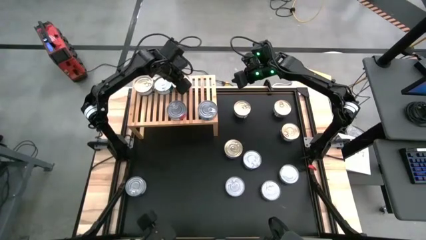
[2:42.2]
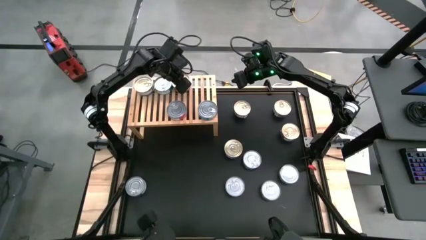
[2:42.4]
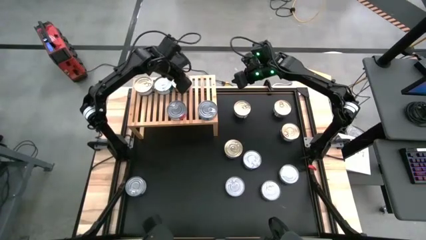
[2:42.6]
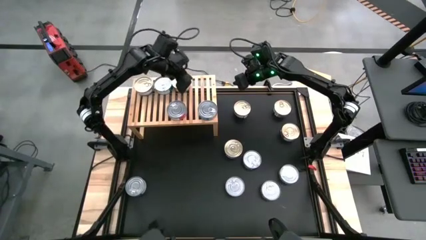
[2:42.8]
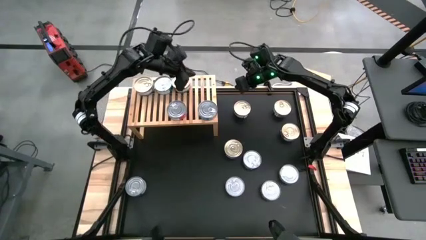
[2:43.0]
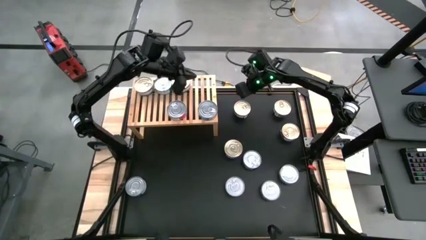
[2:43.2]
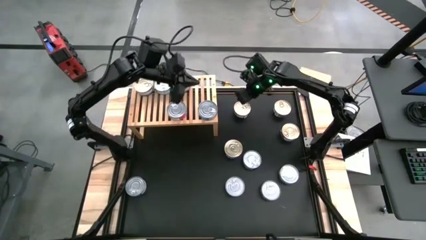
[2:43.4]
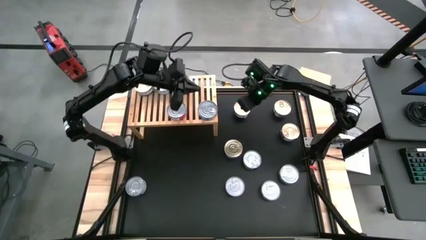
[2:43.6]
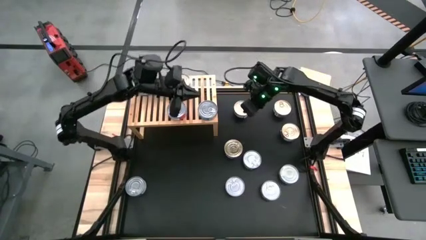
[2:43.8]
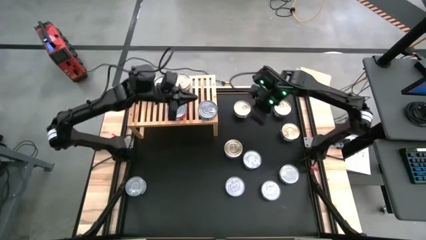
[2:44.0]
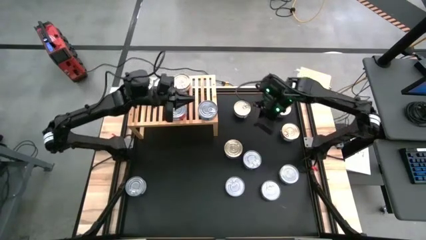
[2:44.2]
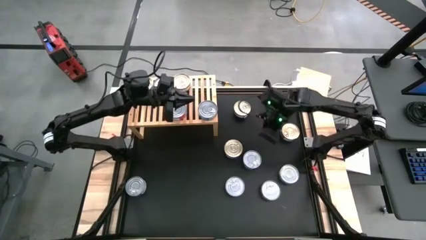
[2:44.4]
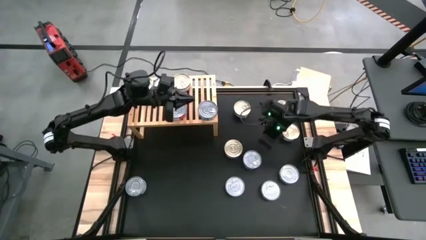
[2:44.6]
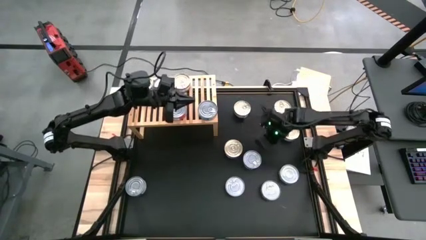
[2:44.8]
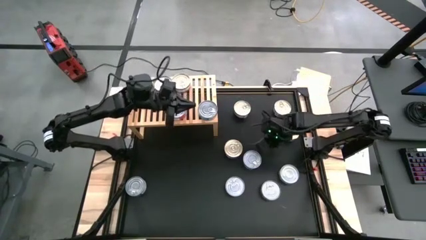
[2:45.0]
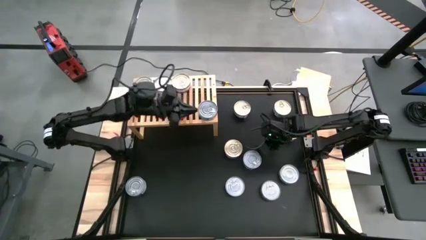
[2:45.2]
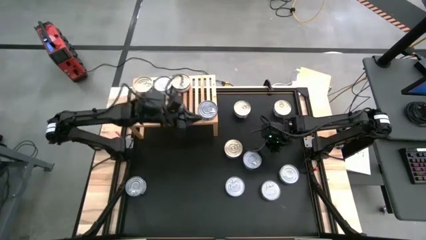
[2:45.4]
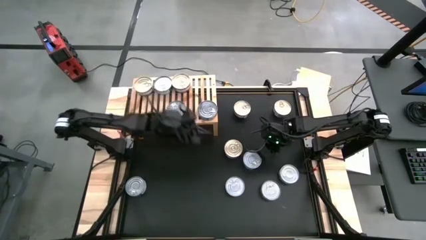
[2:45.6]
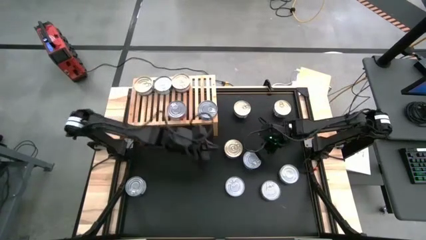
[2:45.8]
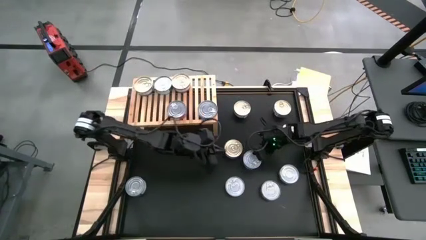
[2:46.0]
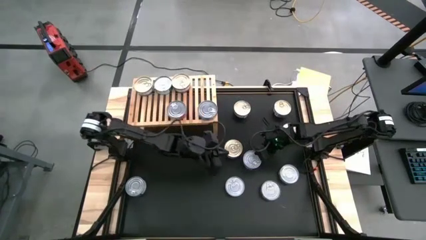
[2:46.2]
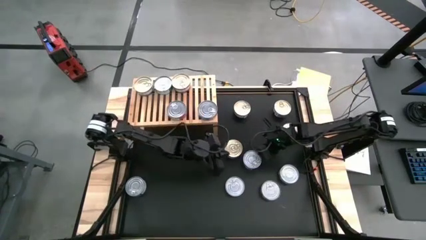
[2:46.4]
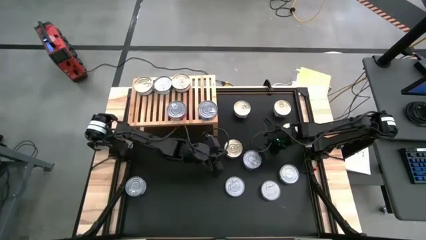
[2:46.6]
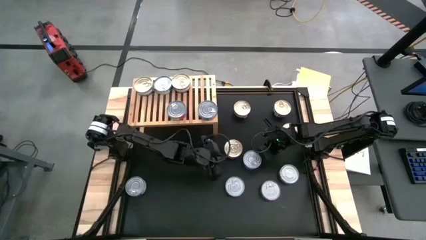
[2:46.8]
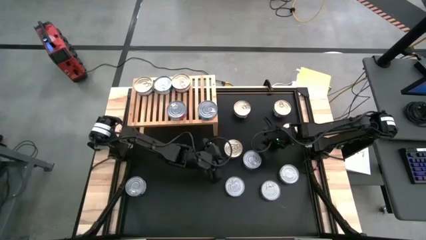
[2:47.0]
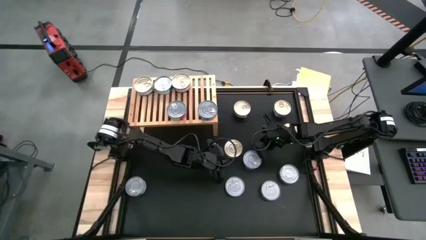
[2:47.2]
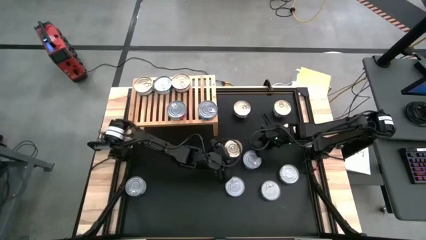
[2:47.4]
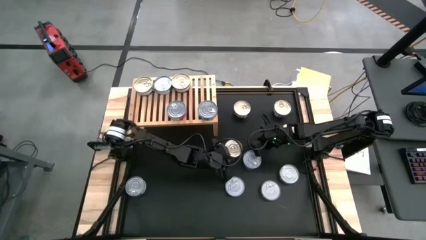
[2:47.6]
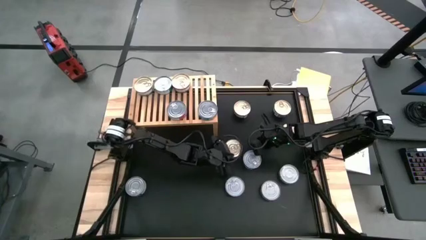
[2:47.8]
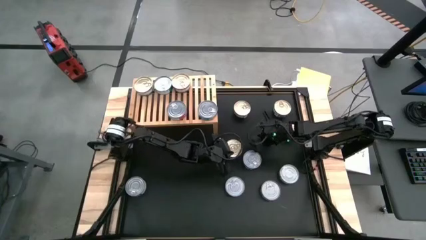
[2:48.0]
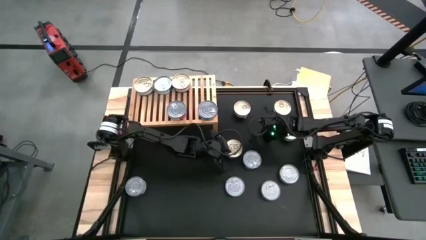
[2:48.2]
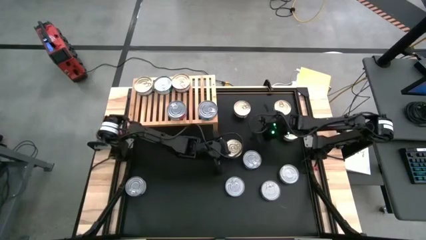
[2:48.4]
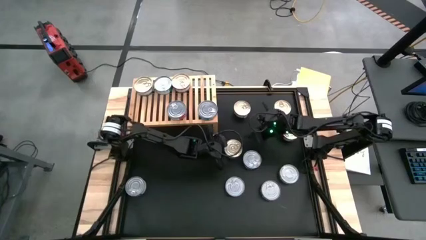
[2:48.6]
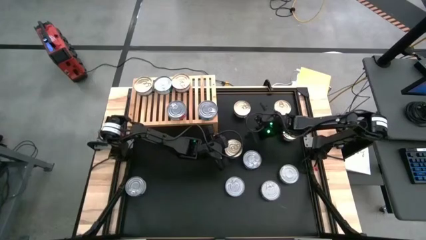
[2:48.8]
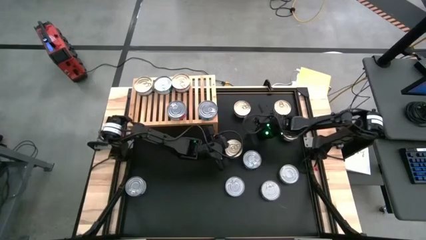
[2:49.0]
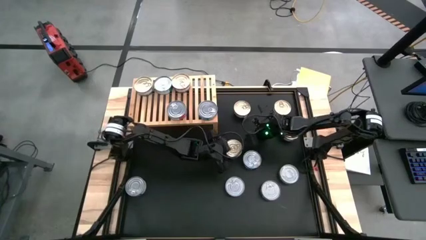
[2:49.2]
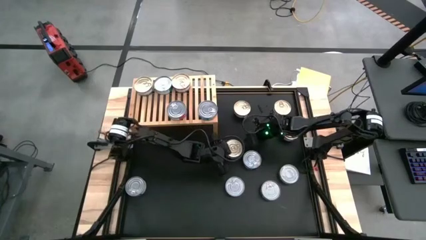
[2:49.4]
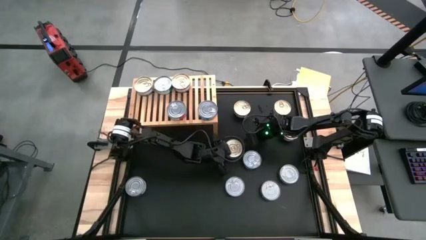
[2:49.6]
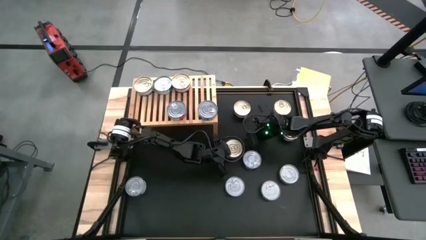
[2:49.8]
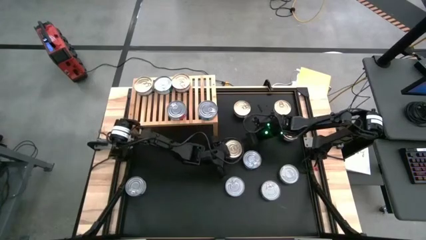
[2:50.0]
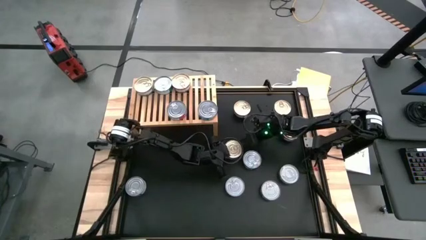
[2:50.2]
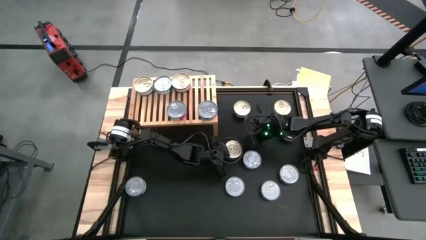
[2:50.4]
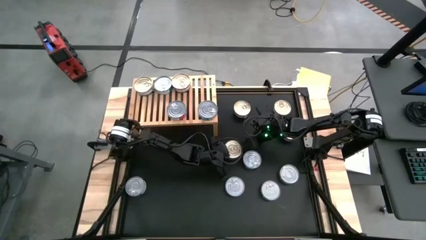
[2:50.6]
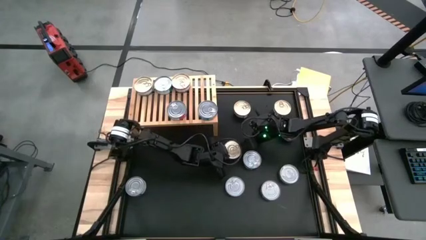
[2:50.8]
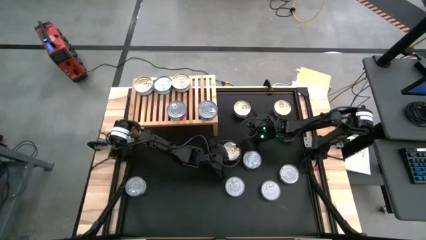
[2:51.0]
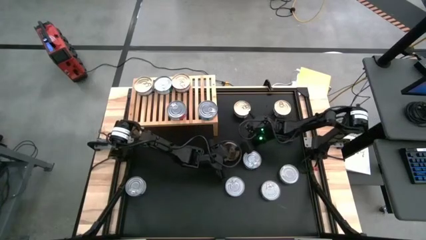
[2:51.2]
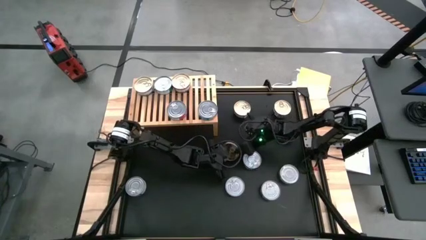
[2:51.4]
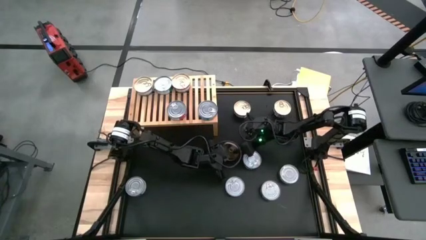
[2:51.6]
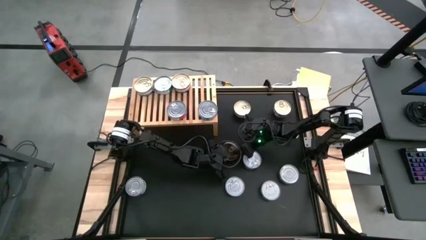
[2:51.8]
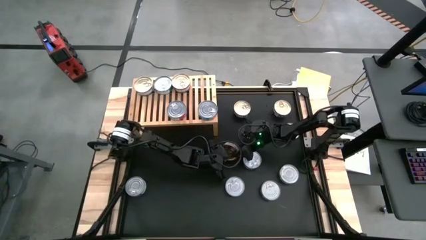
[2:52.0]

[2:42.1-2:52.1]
Task: Stack canned seafood by type on shelf
Stack the blue pink tuna can on top of the other blue pink tuna can on the shelf

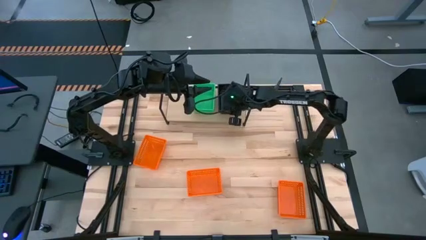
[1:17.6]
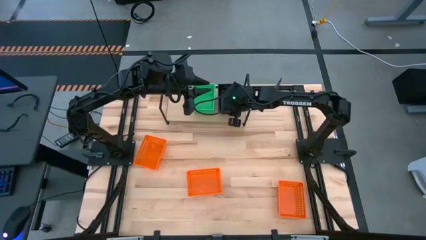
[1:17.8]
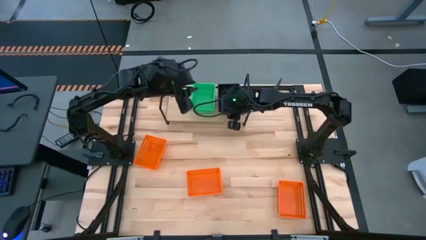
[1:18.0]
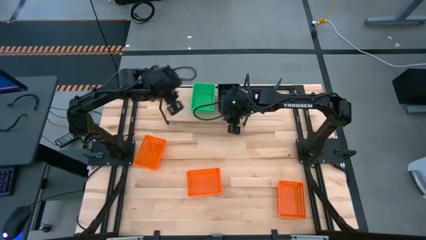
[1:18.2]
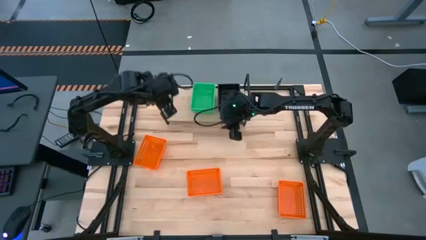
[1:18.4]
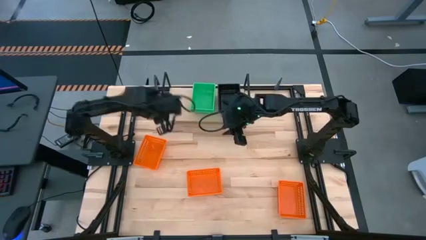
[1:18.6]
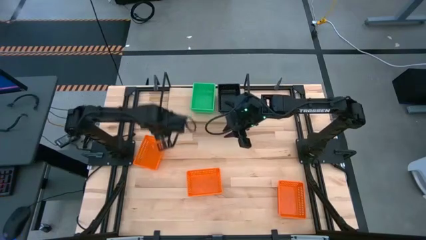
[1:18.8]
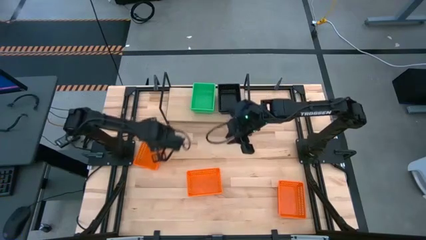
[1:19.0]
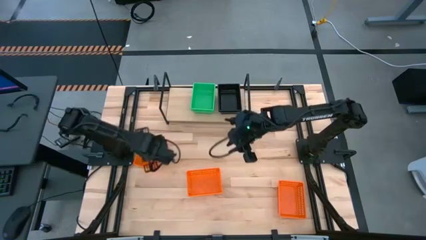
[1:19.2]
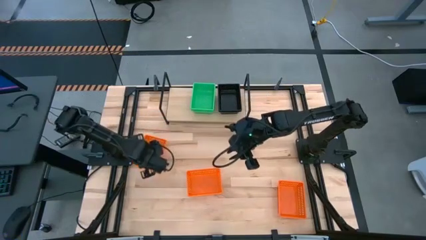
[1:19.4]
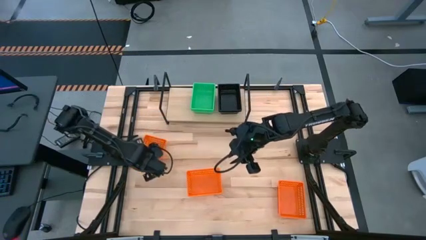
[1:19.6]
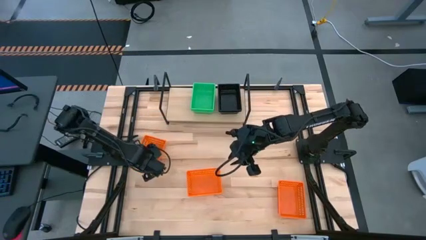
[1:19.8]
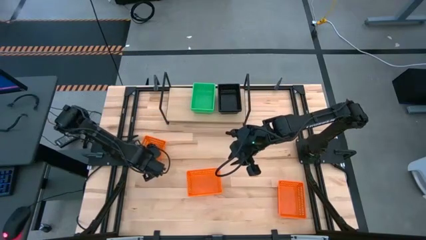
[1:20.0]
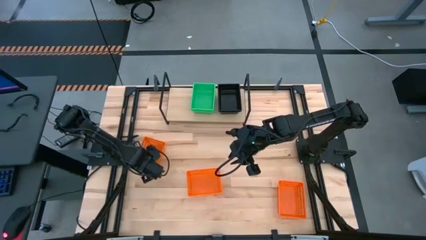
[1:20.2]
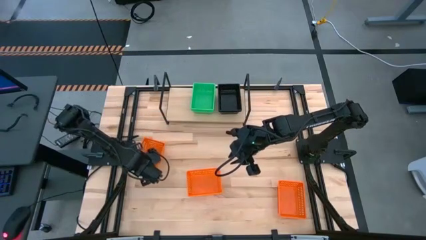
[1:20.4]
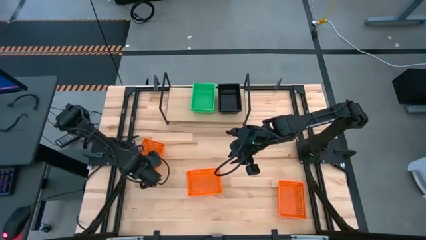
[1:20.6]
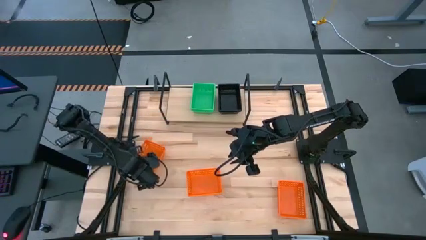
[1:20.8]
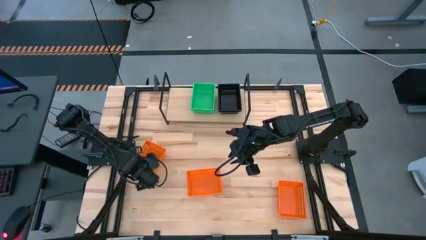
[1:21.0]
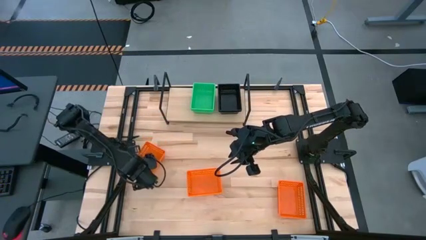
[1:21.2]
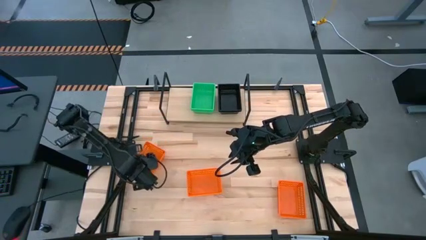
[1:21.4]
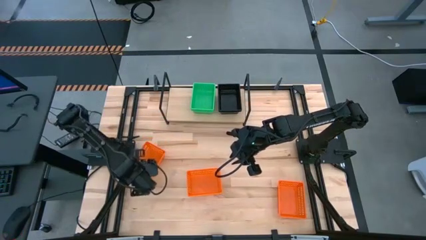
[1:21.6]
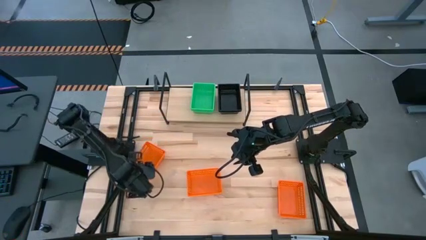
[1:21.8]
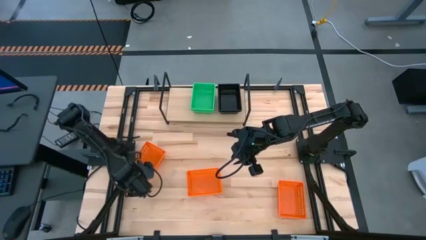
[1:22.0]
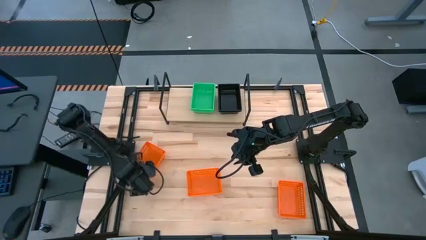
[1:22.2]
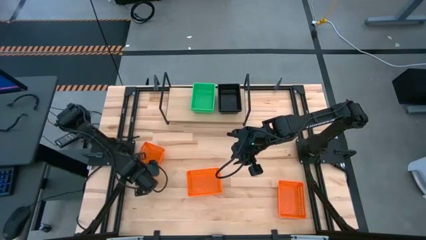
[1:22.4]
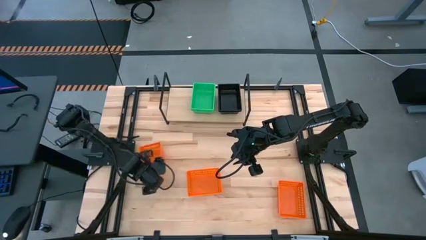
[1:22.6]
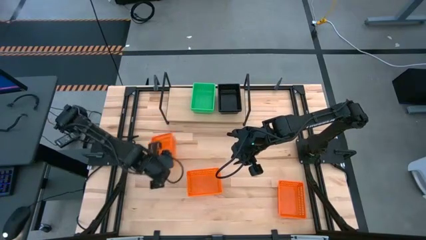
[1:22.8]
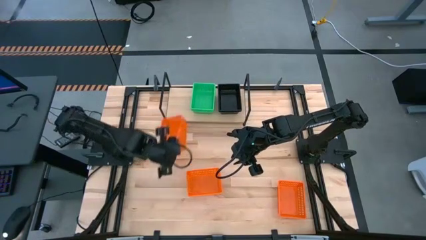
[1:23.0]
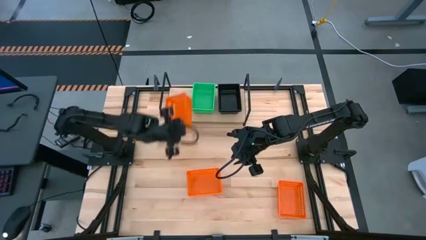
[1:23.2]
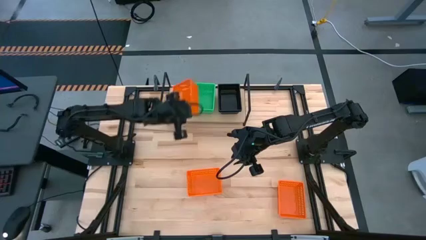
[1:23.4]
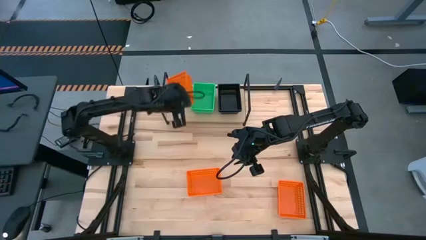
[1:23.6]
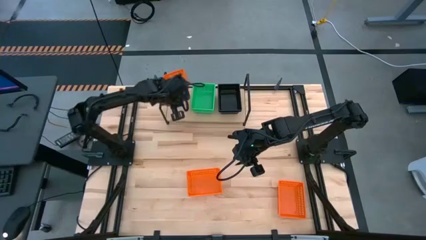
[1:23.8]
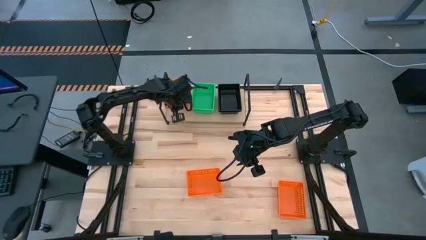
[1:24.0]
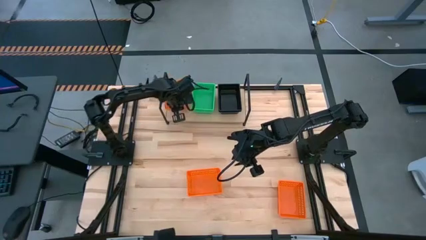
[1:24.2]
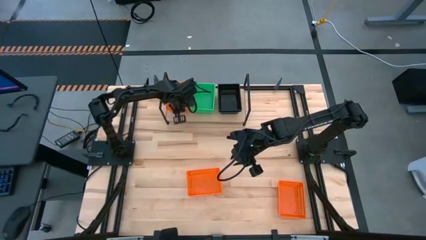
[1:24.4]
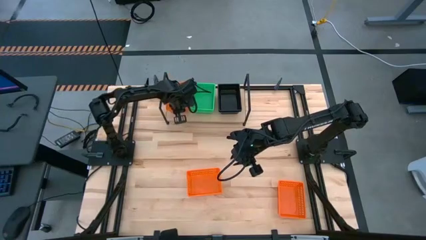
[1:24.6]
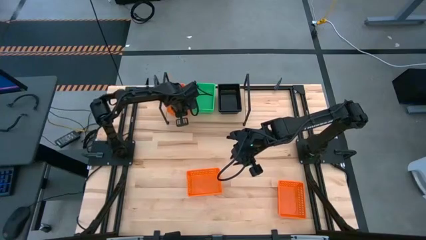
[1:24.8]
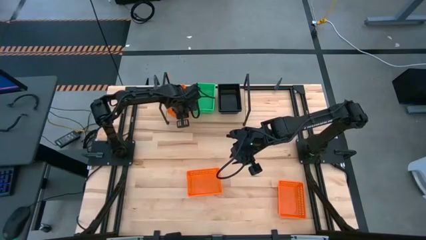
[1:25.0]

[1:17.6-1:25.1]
Task: Stack baskets on shelf by color
Put the top orange bin on the shelf
